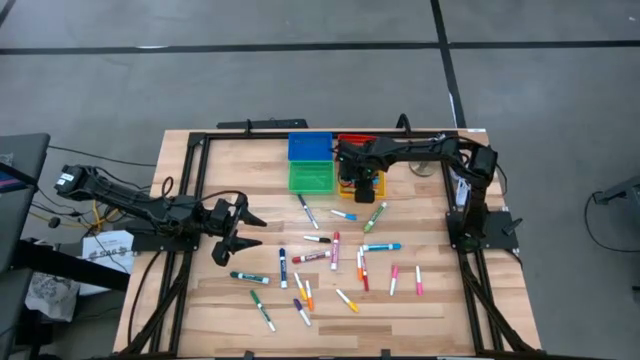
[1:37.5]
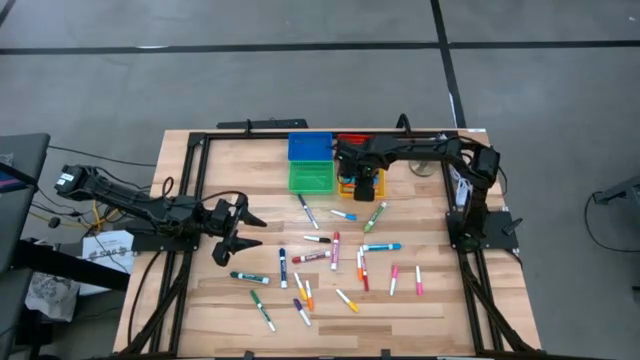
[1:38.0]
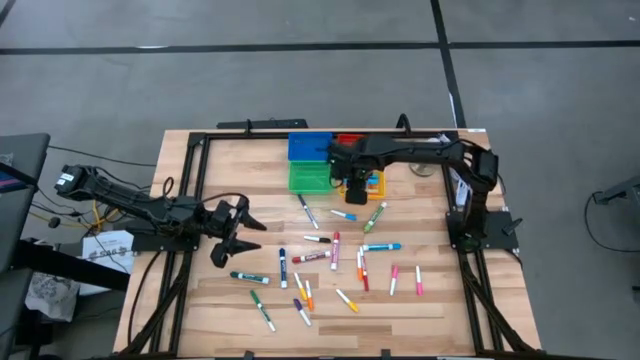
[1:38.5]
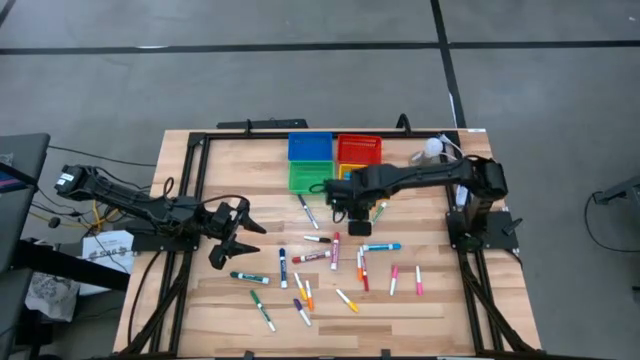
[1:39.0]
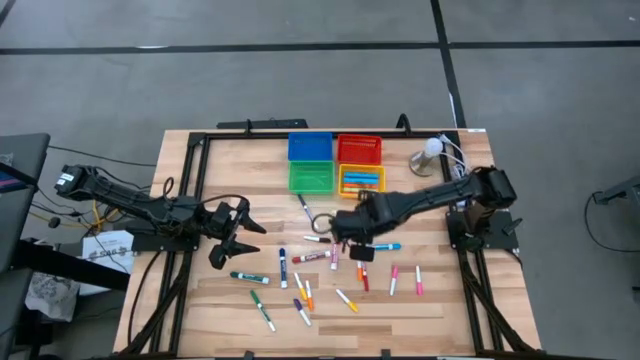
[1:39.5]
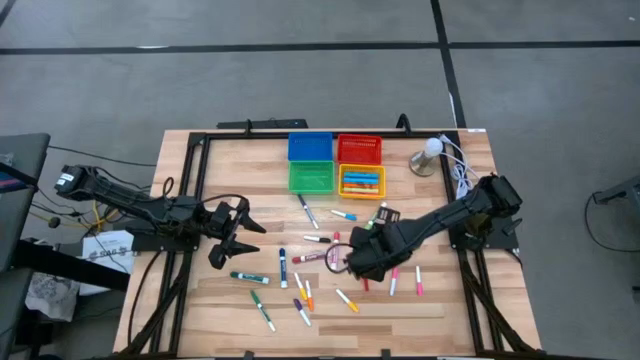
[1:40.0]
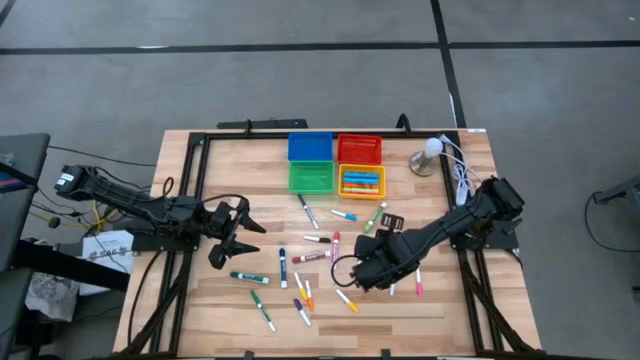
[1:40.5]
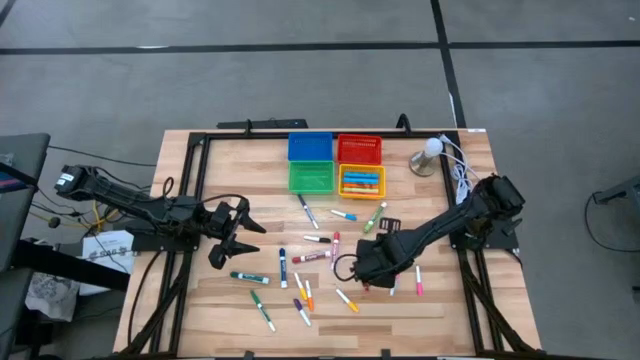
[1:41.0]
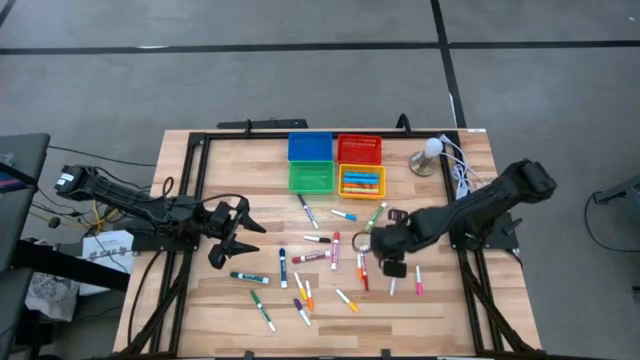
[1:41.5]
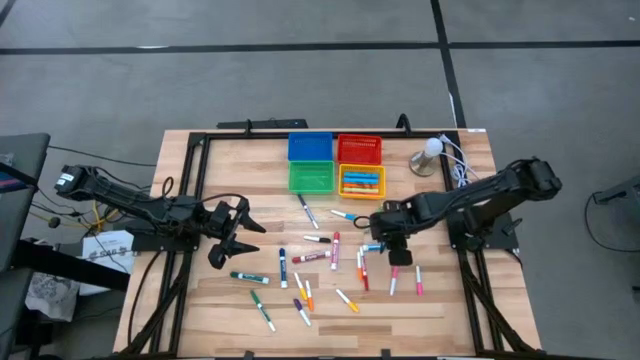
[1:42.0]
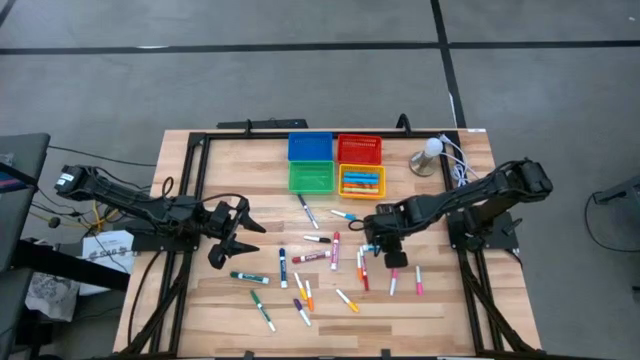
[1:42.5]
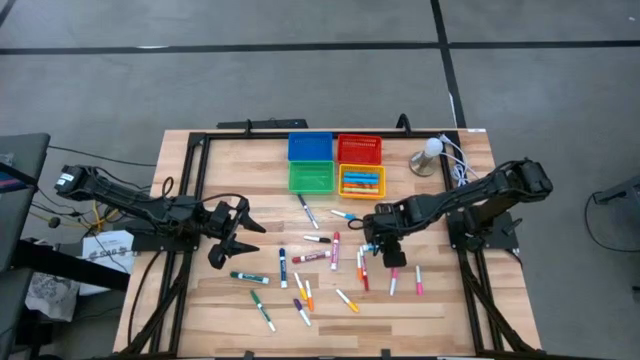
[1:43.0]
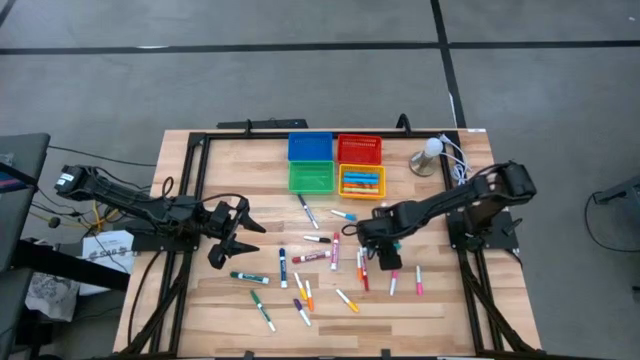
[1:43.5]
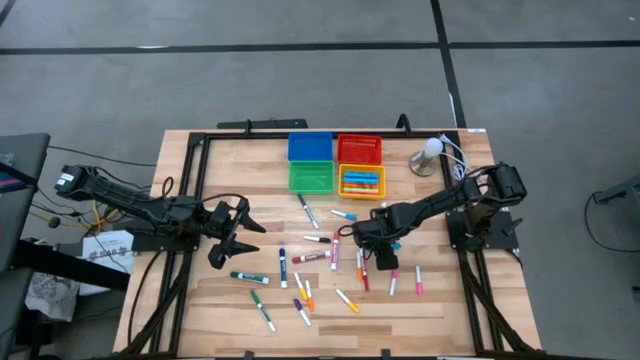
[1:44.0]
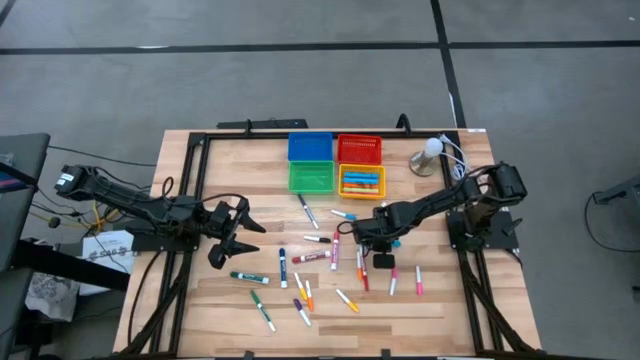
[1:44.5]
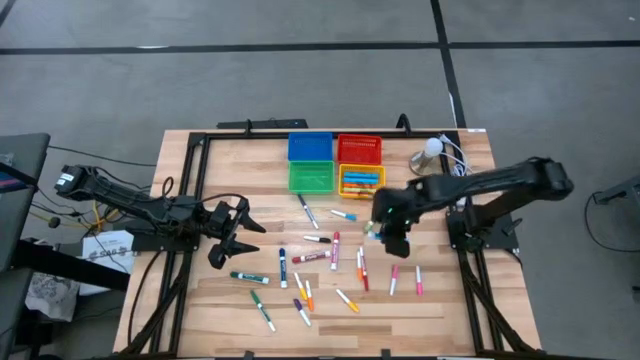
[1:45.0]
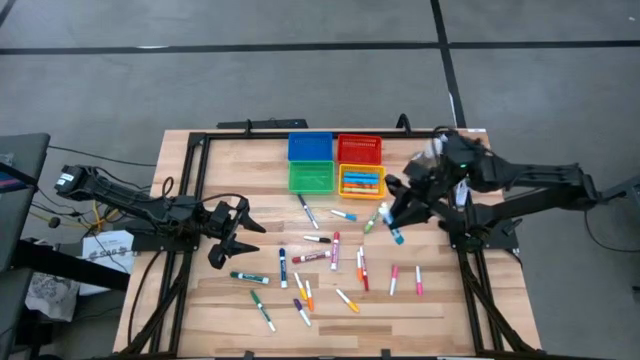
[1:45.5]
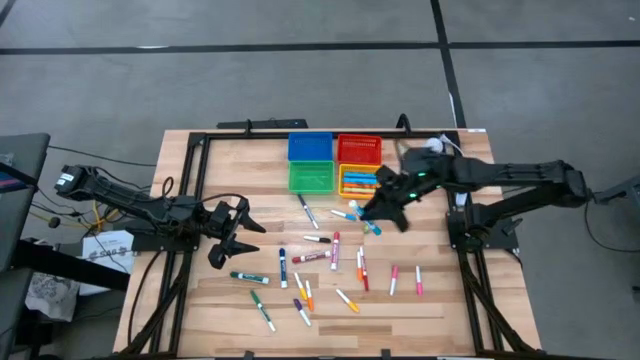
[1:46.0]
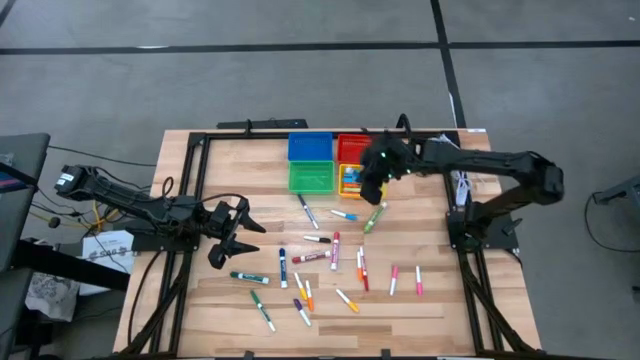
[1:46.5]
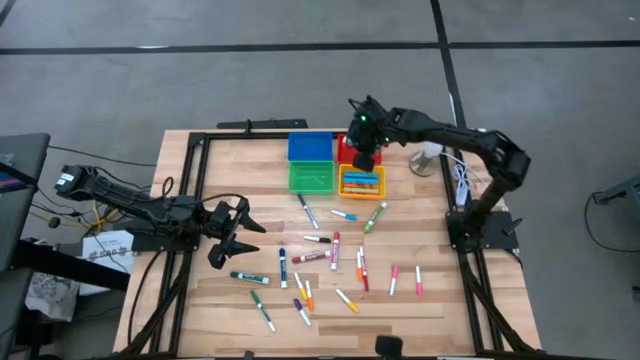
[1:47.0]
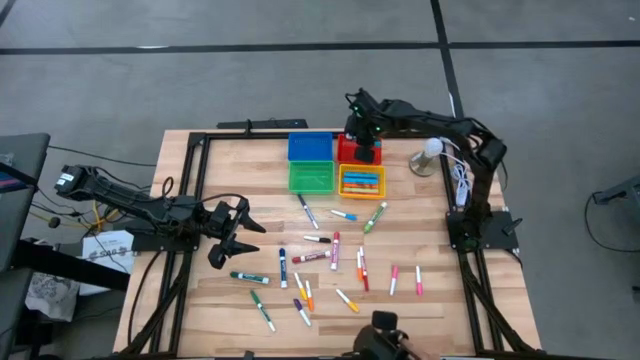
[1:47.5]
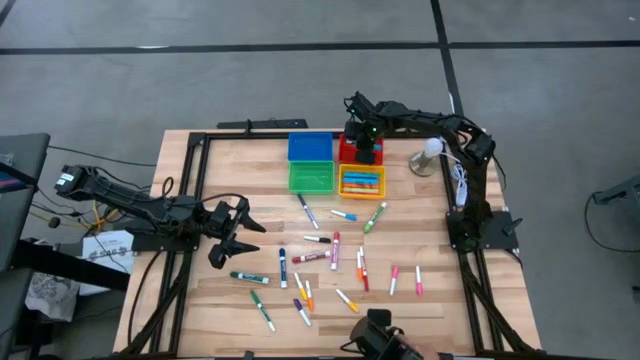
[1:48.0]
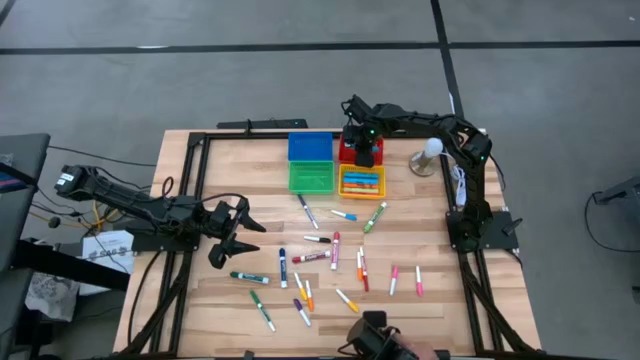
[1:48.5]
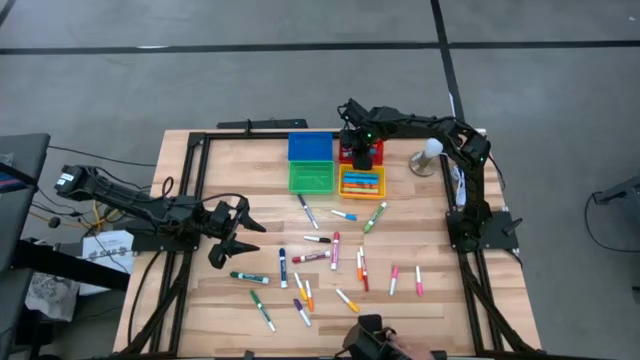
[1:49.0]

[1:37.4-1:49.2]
Task: Pick & Place Markers
Put the blue marker pen into the red bin

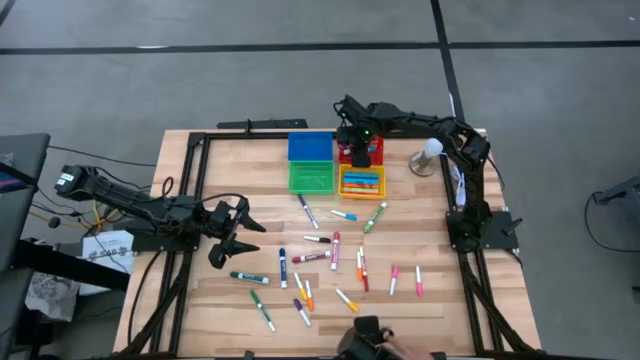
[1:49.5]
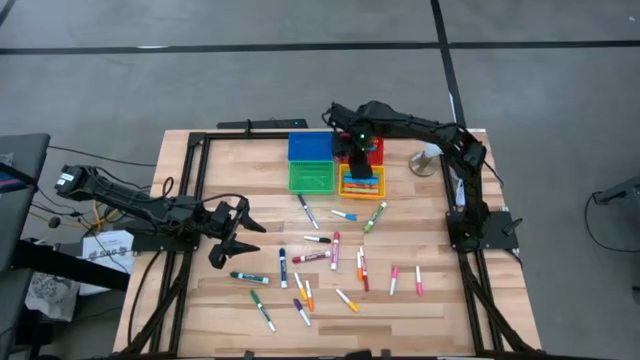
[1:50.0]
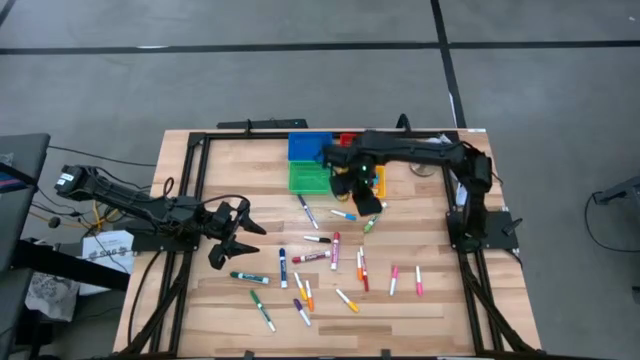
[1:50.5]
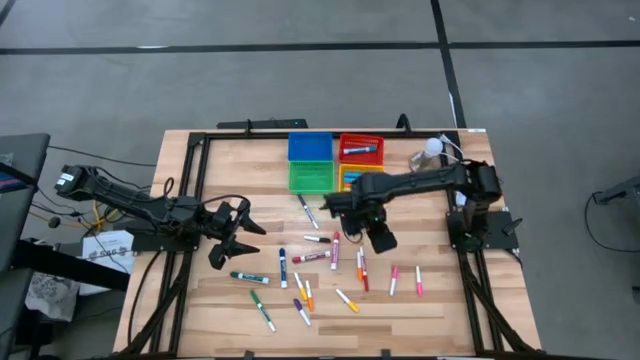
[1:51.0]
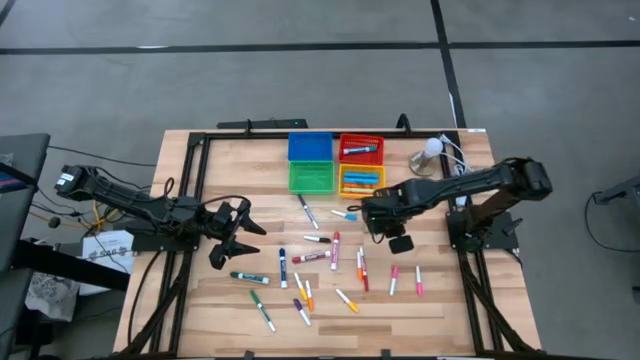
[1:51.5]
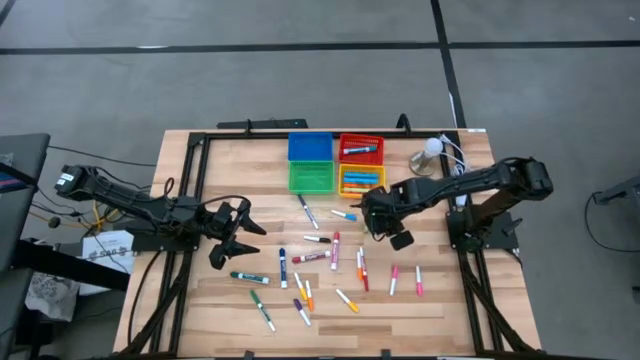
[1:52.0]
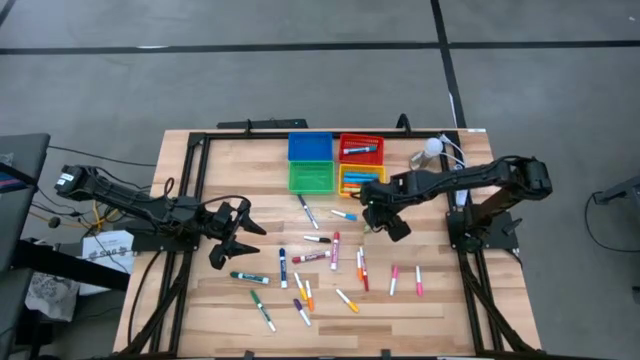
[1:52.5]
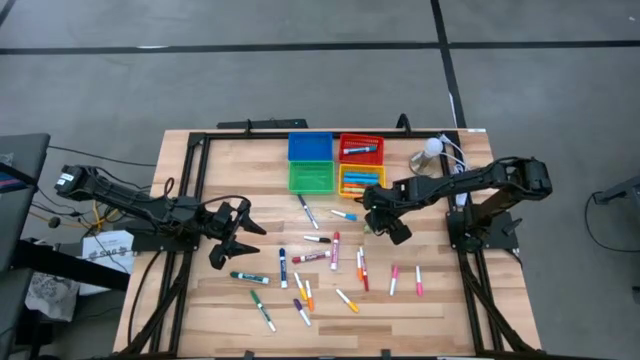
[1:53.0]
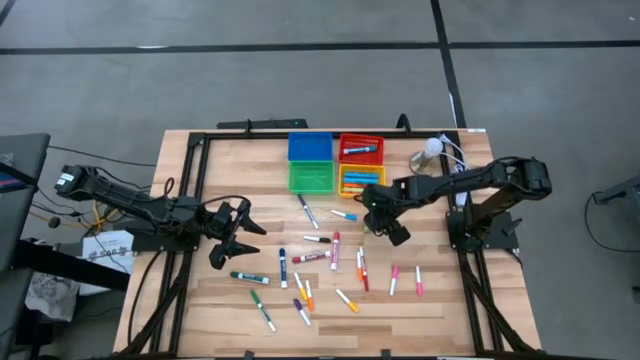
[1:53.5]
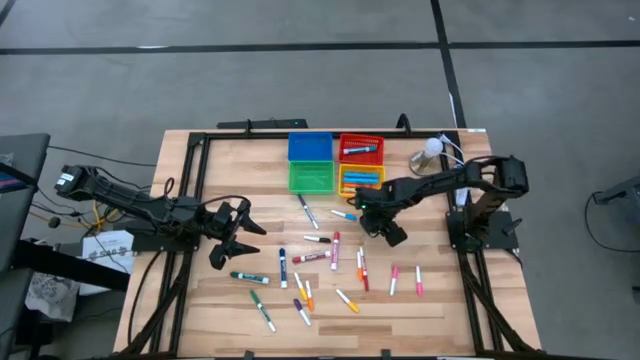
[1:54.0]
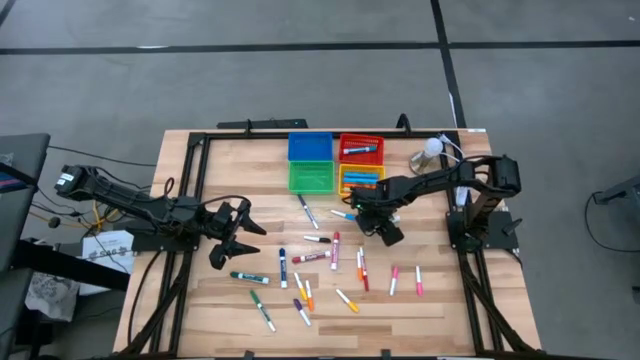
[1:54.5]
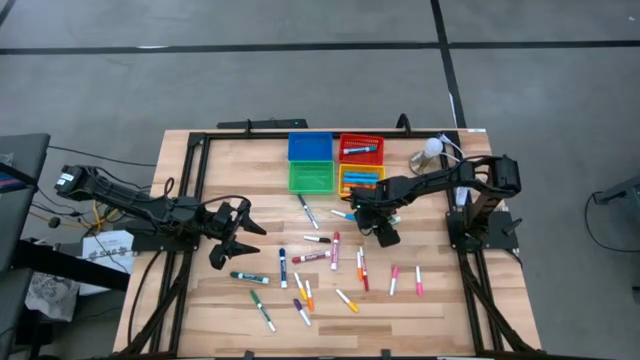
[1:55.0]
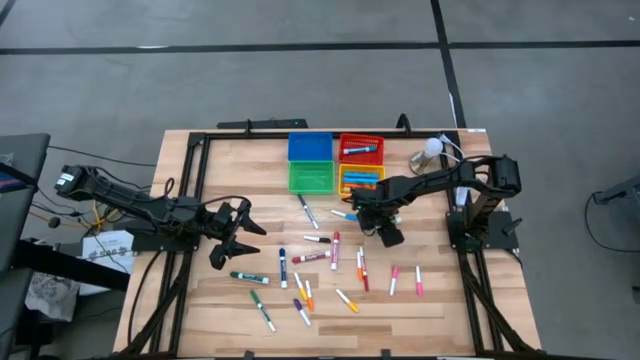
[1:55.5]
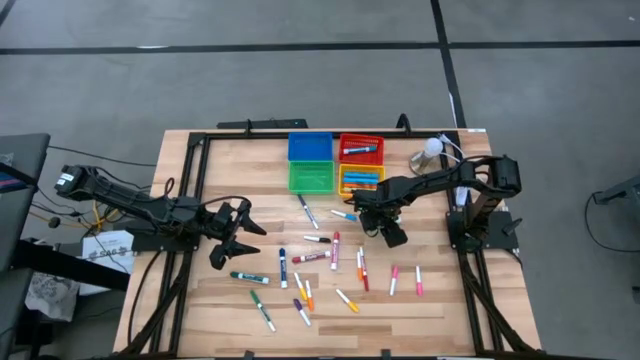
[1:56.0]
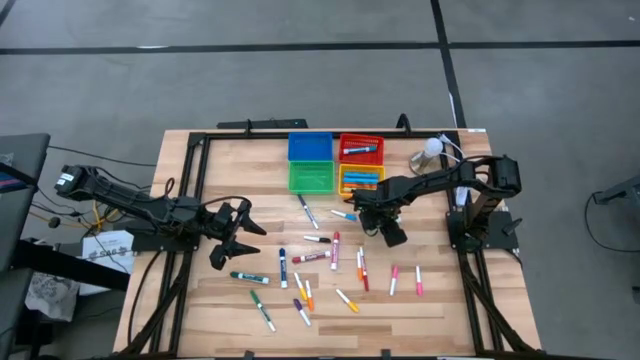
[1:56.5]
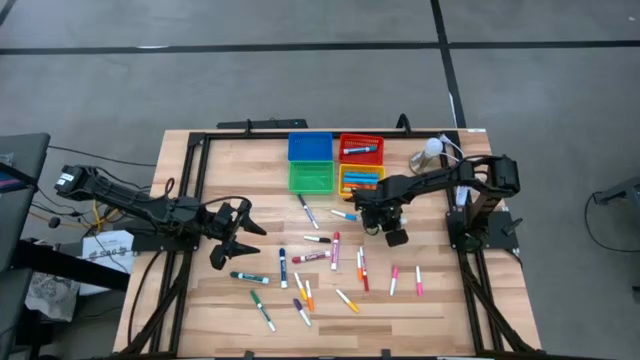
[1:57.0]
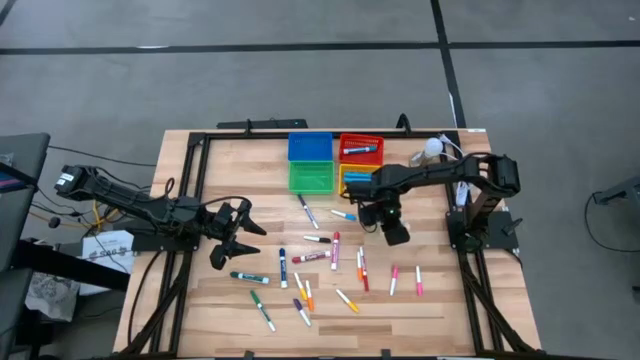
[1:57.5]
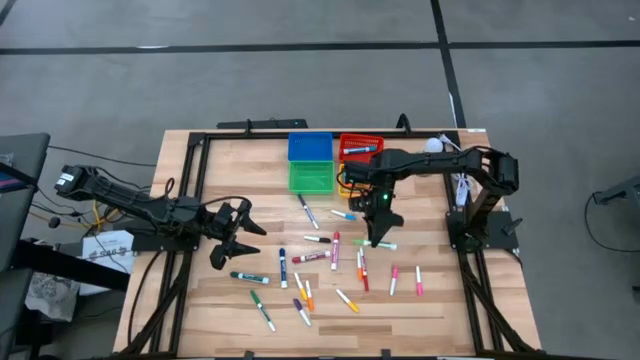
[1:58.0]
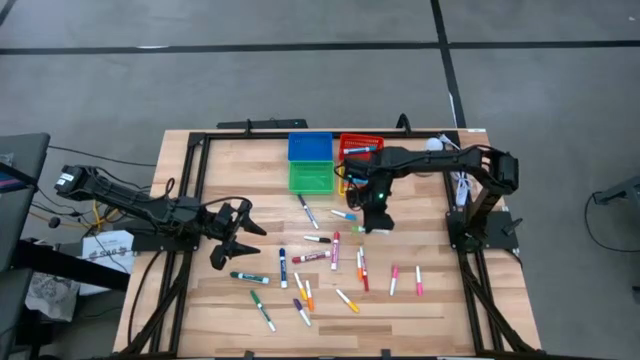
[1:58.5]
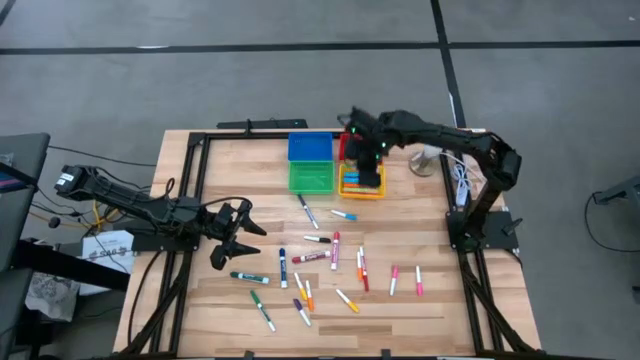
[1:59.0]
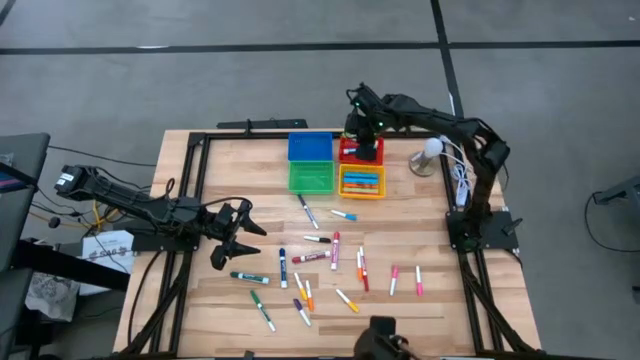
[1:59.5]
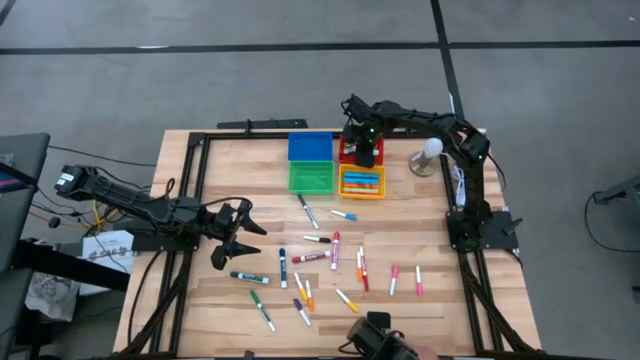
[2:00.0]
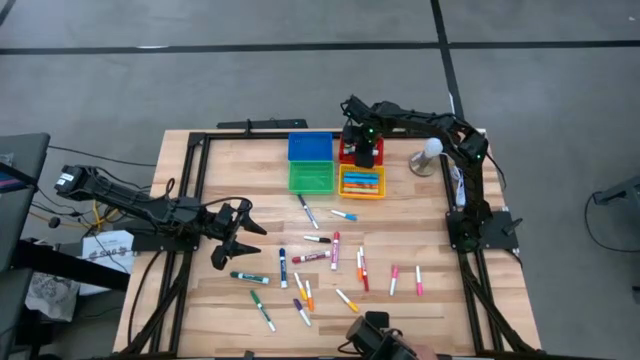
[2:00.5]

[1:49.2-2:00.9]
Put the green marker pen into the red bin
